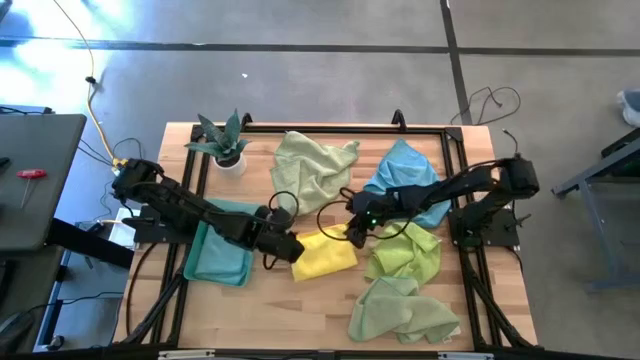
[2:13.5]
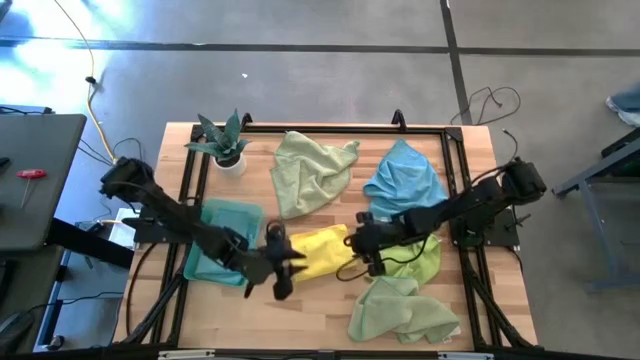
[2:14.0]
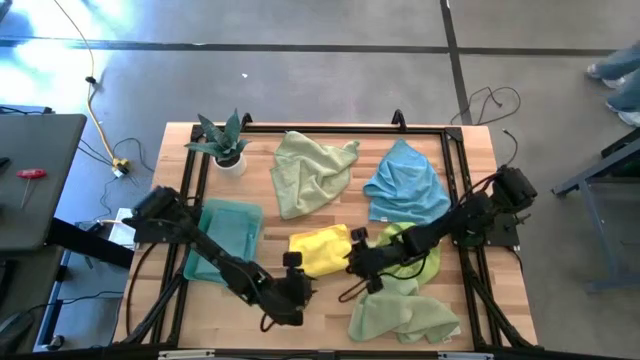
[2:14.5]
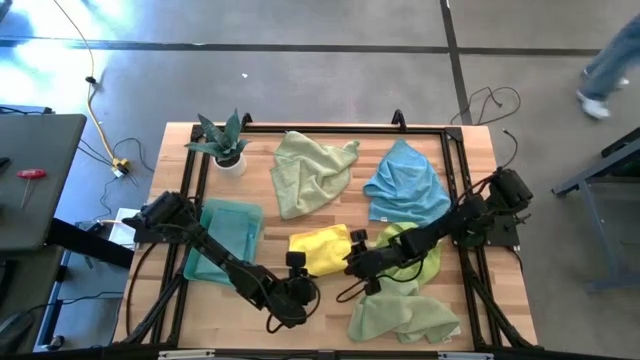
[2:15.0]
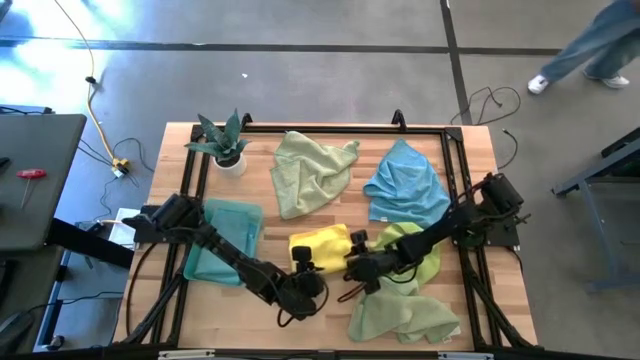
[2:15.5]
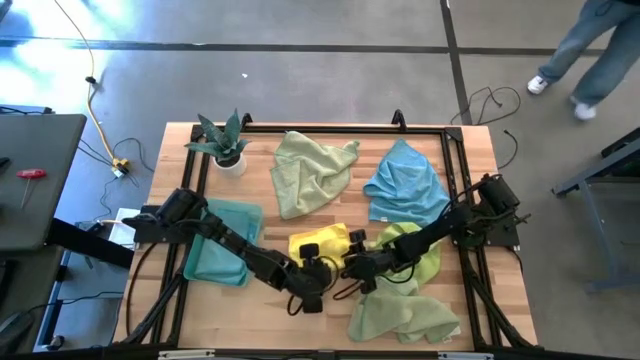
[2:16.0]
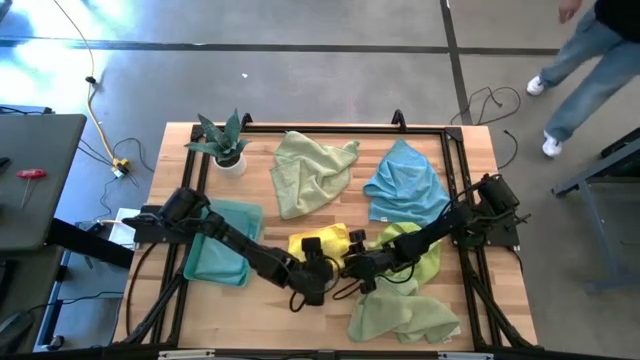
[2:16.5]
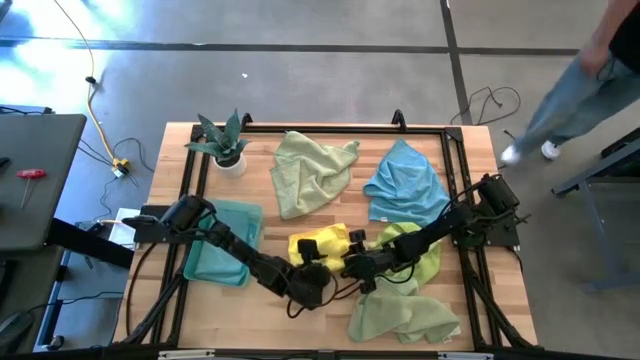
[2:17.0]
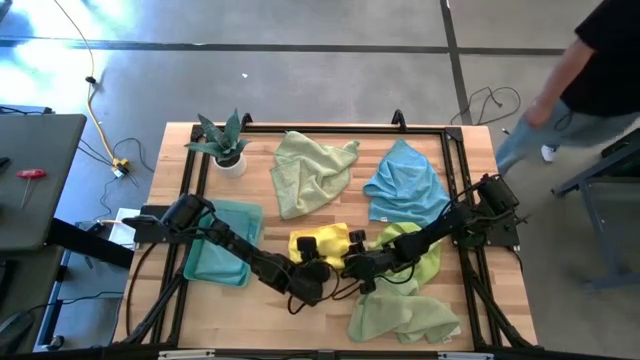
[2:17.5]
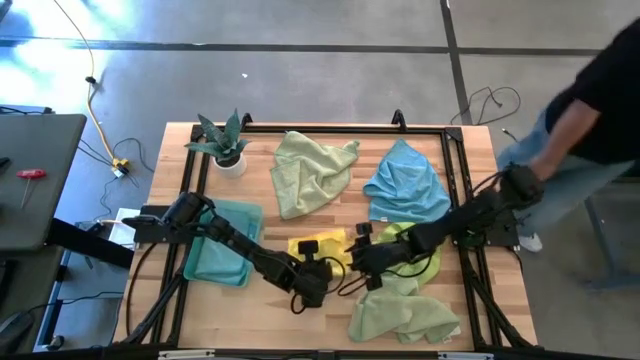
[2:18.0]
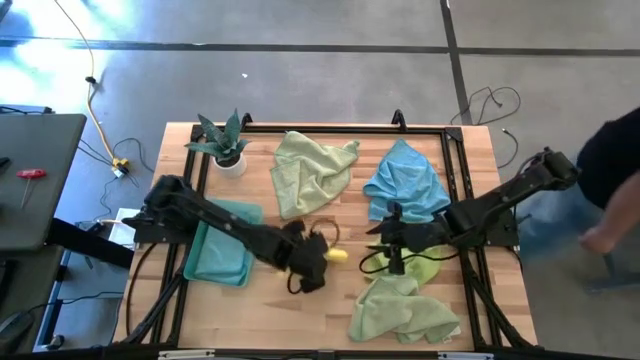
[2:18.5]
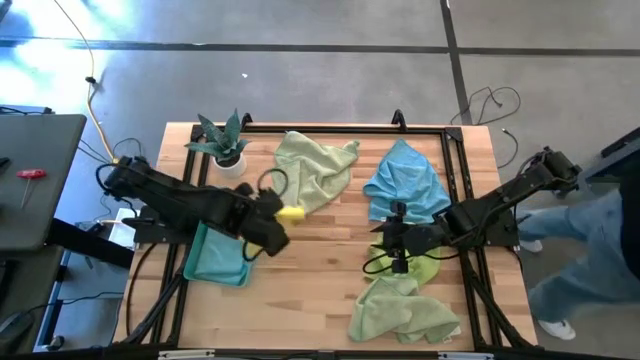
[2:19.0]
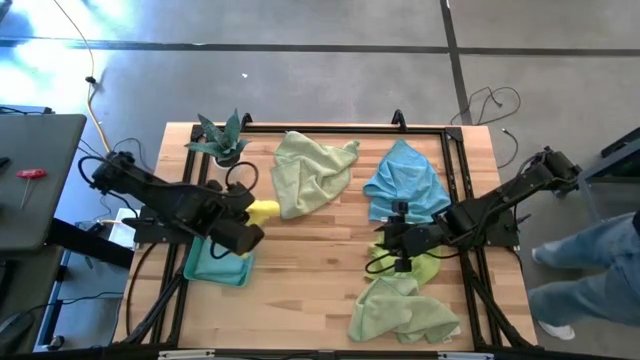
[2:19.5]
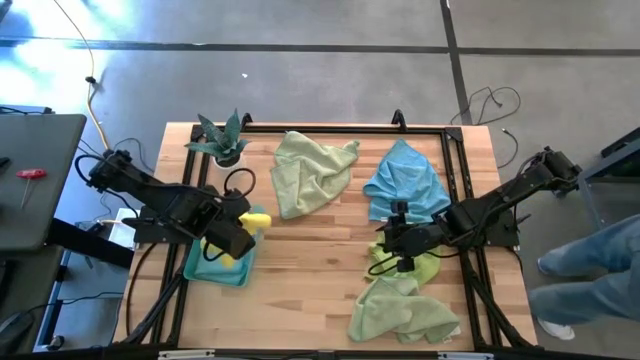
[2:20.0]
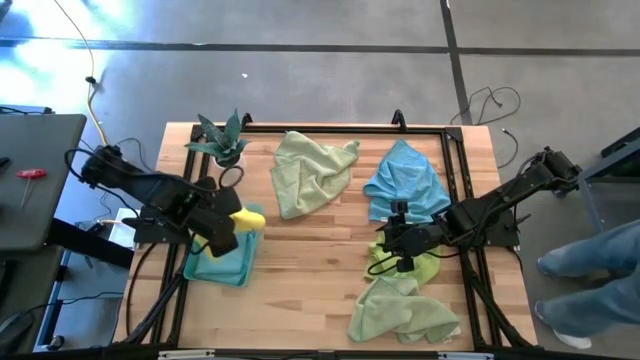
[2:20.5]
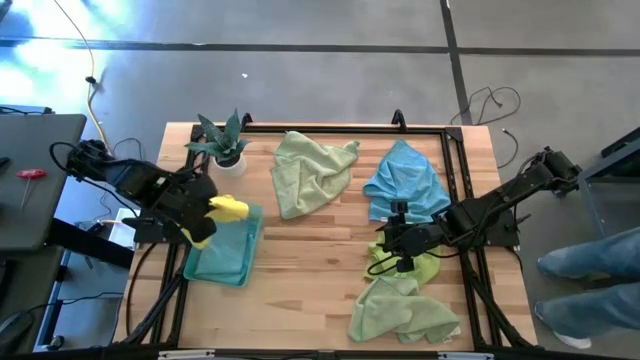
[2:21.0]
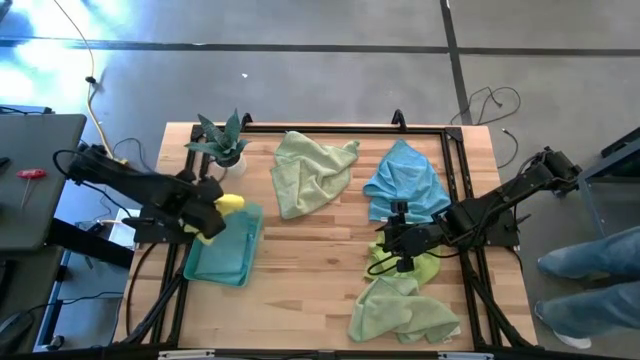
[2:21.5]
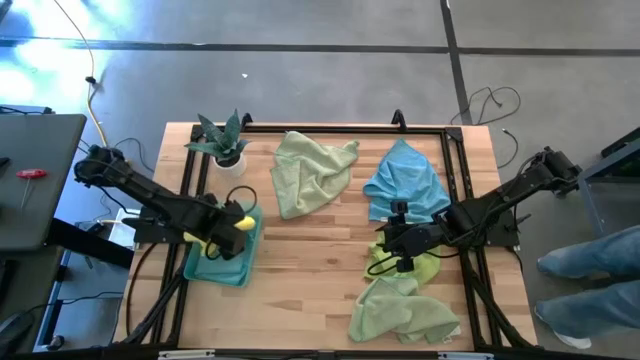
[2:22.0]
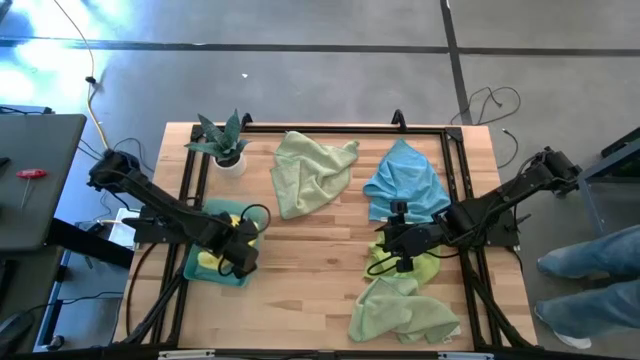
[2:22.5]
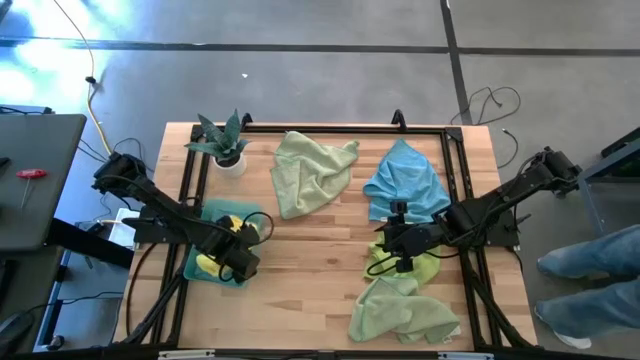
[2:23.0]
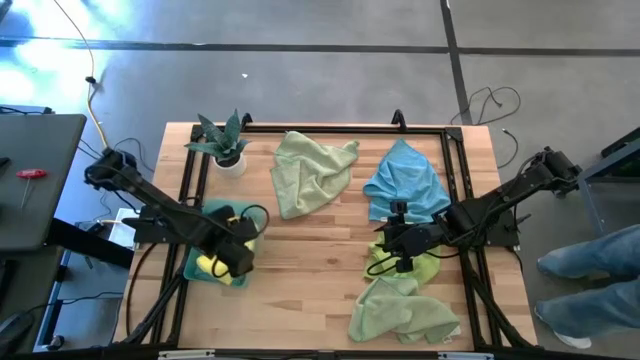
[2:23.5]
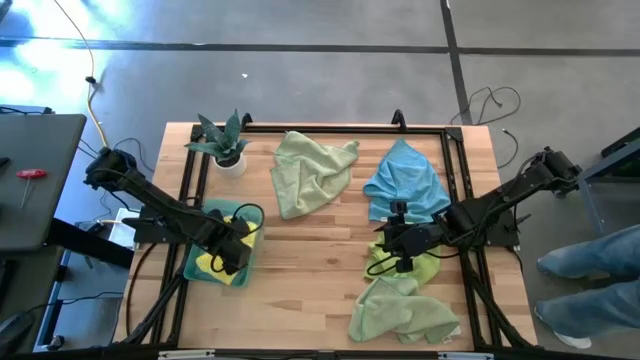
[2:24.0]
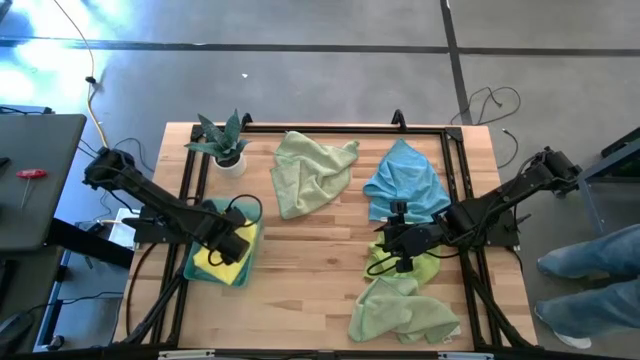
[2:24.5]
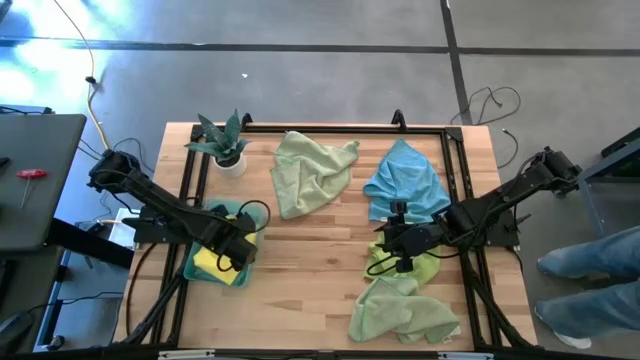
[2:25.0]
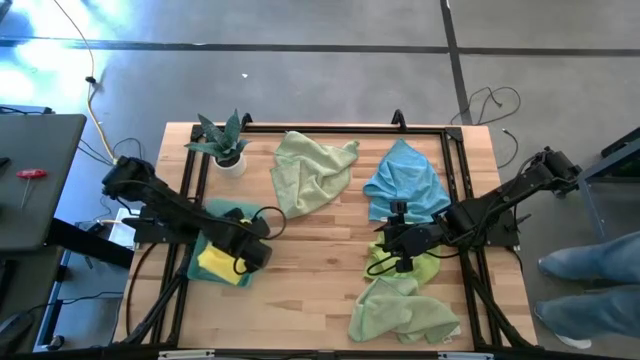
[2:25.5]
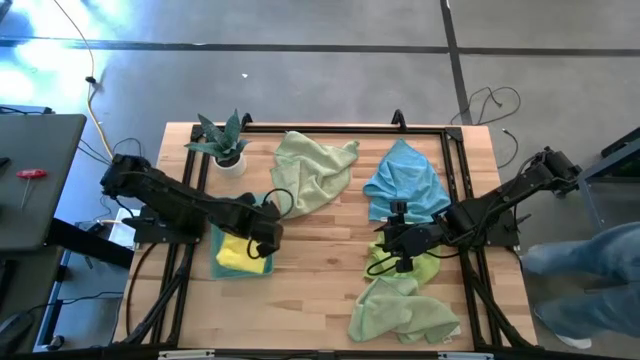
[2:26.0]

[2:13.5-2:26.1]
Task: Fold microfiber towels
Put the yellow microfiber towel into the green bin

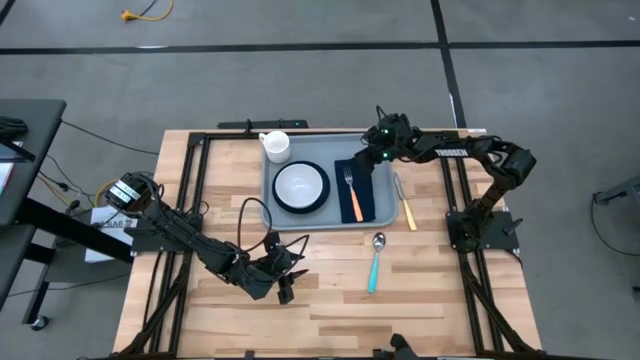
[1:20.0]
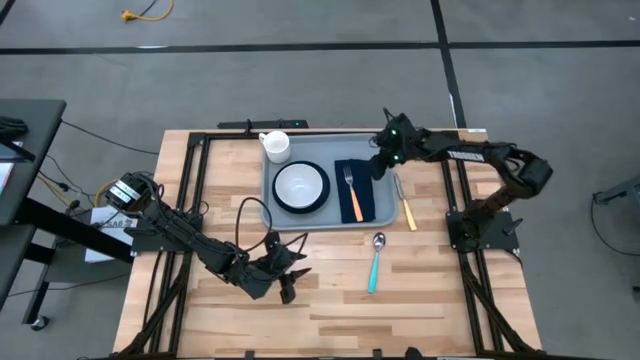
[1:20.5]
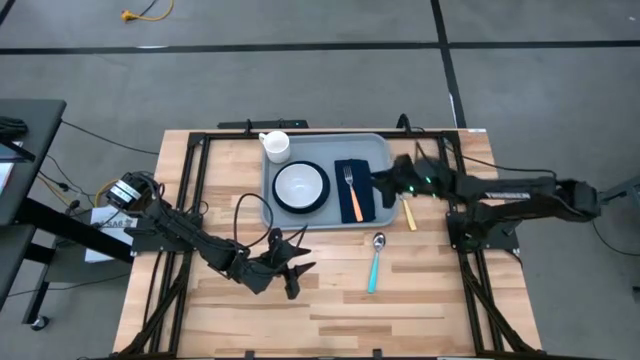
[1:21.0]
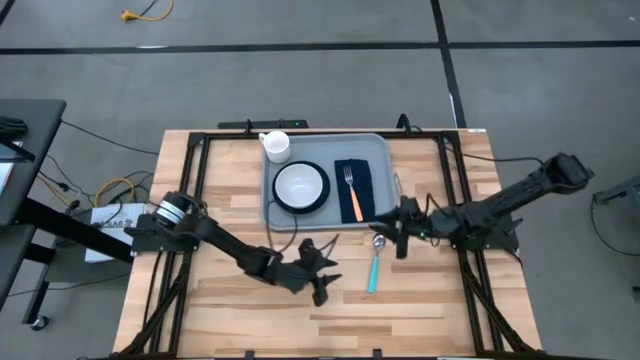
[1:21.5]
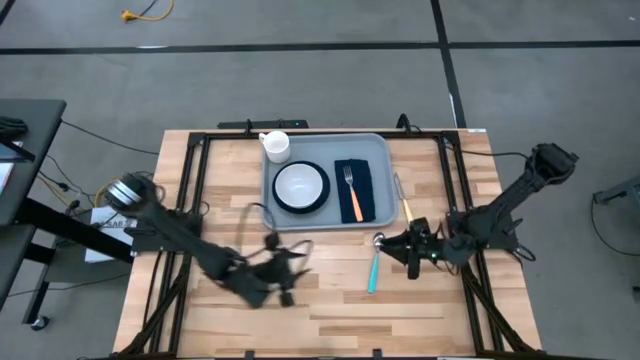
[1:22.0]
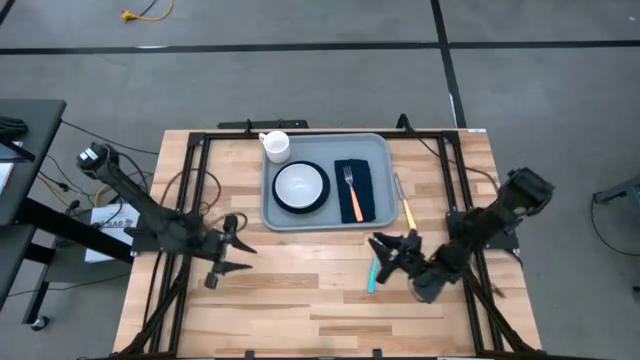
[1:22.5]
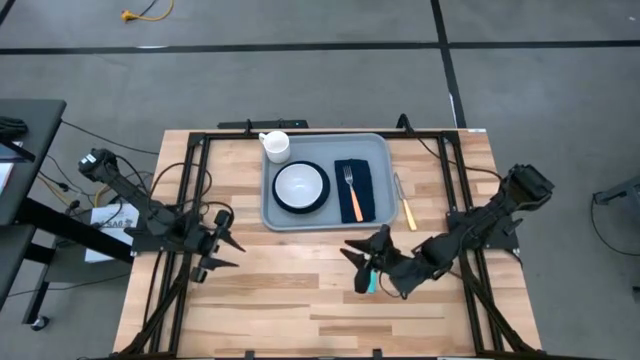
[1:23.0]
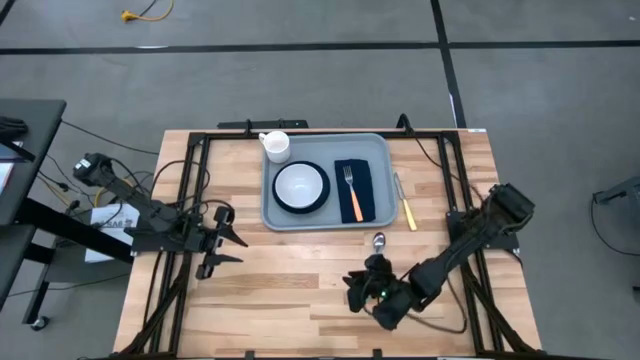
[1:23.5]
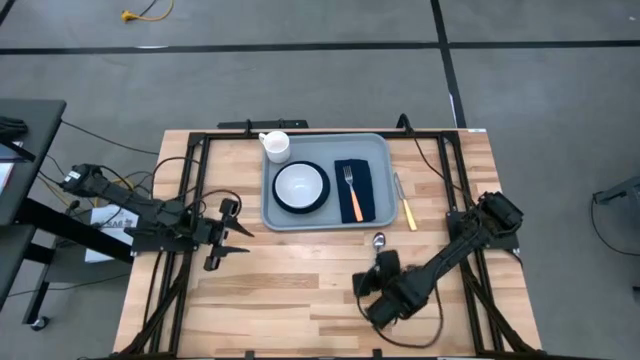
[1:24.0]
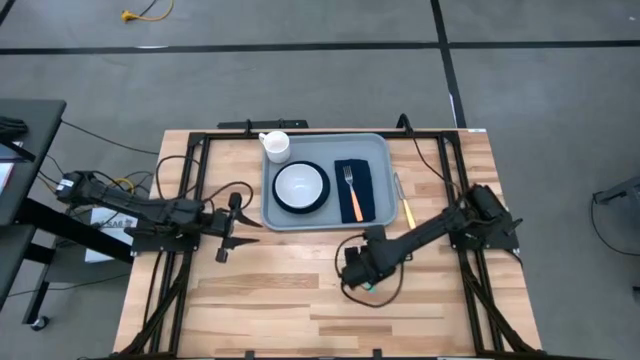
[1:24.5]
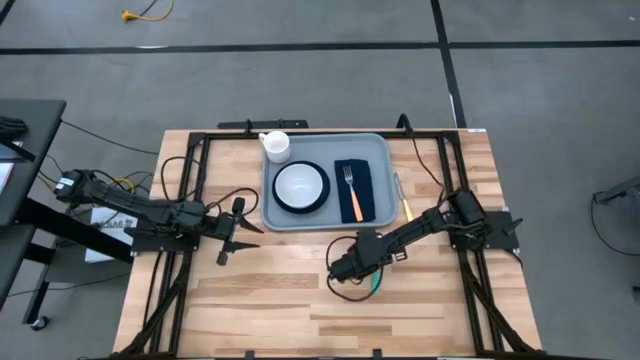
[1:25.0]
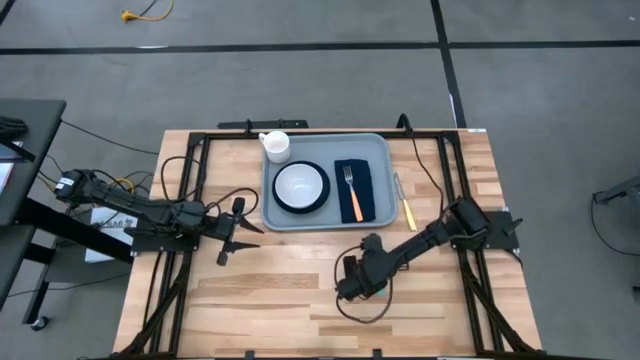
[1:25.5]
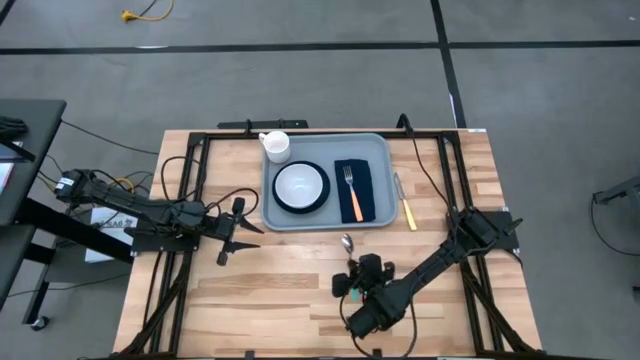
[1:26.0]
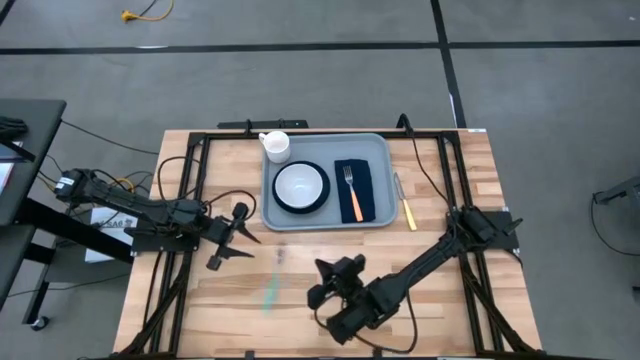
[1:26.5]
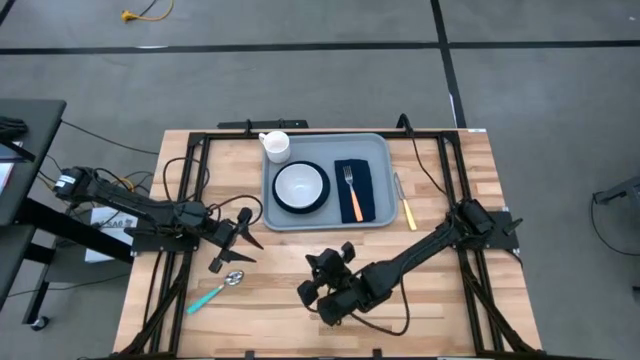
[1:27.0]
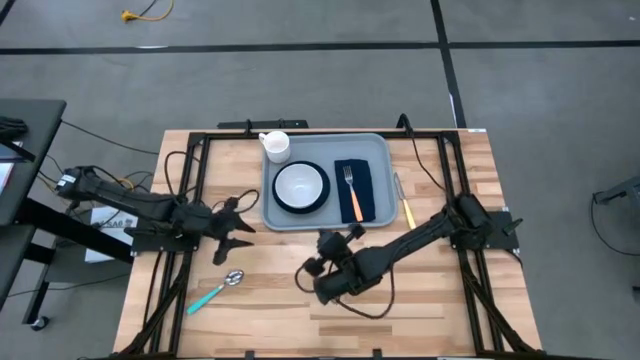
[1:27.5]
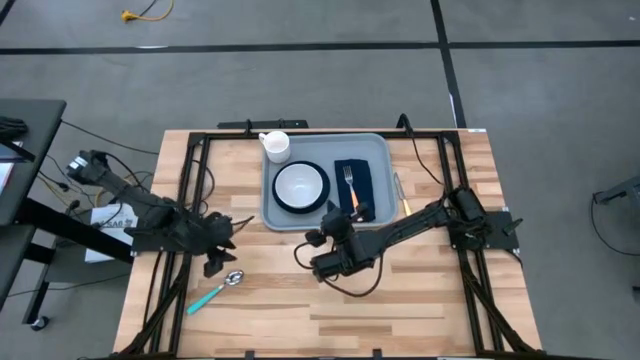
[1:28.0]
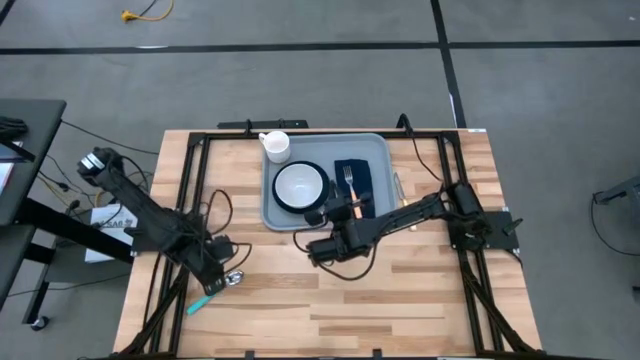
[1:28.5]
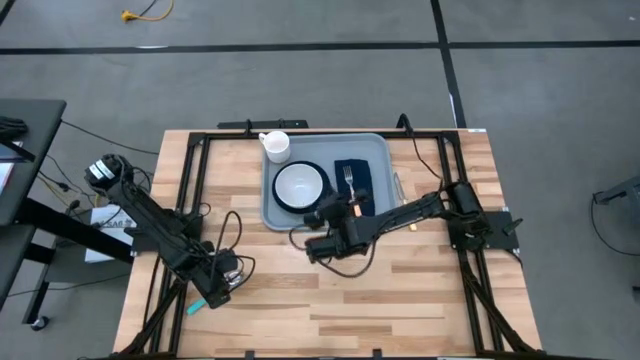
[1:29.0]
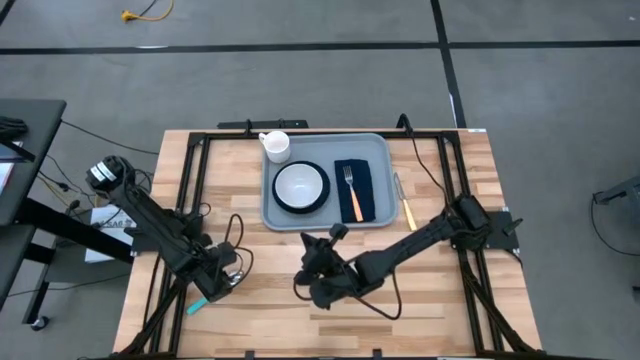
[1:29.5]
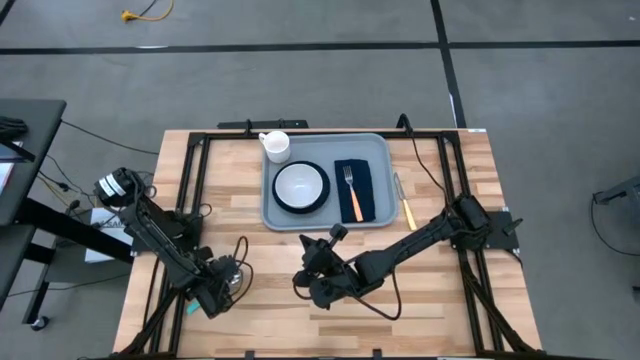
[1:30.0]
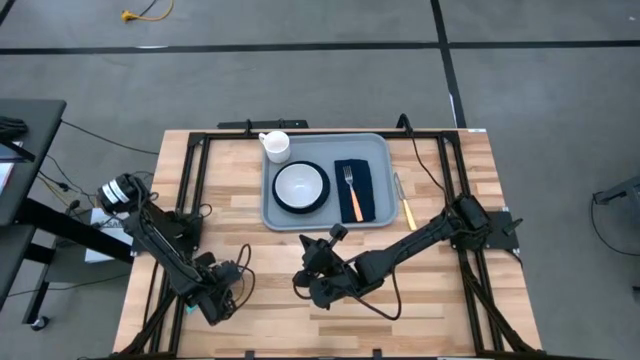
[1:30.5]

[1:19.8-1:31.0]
Task: Set up tray
Put the blue spoon to the right of the green plate on the blue napkin on the gray tray
